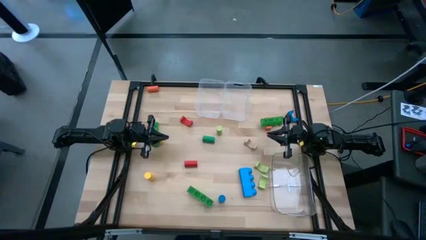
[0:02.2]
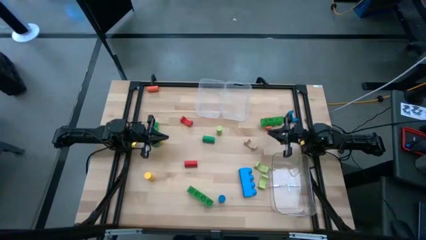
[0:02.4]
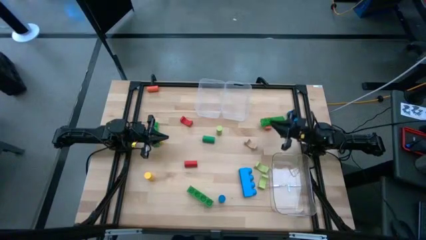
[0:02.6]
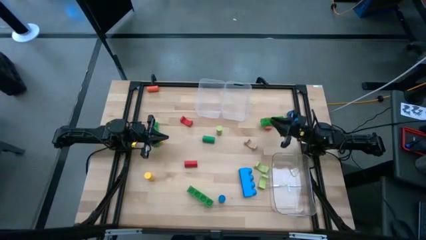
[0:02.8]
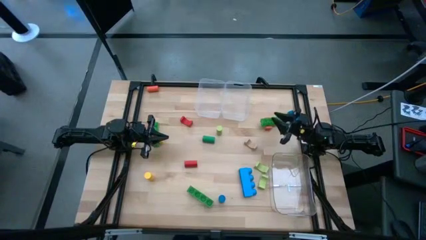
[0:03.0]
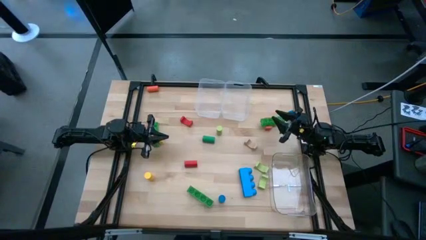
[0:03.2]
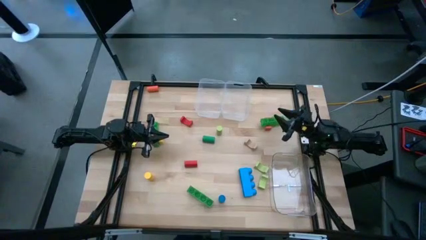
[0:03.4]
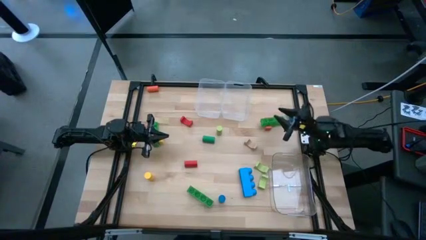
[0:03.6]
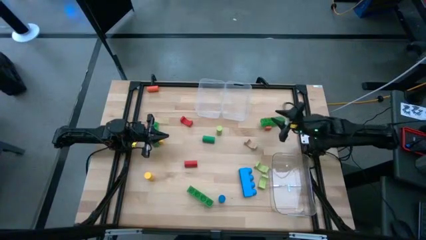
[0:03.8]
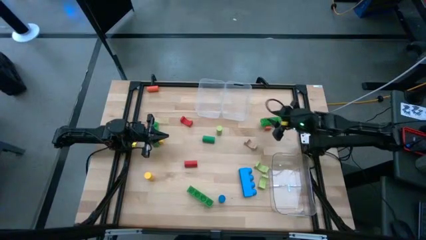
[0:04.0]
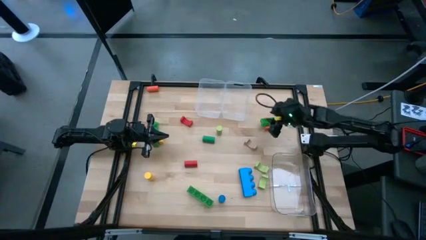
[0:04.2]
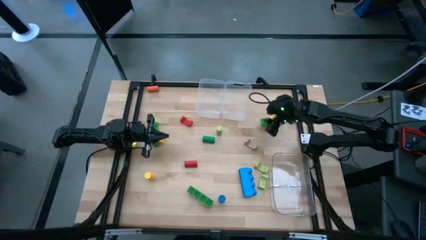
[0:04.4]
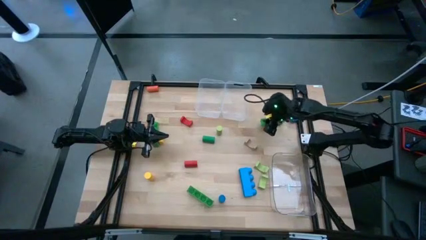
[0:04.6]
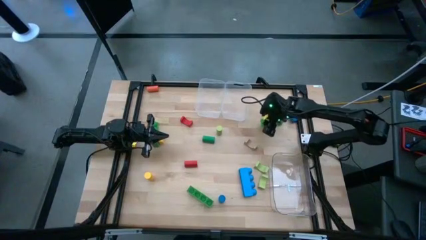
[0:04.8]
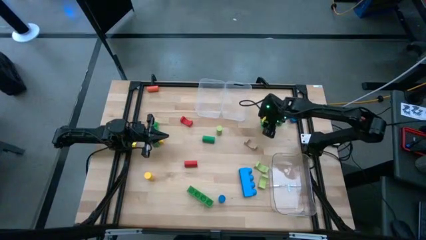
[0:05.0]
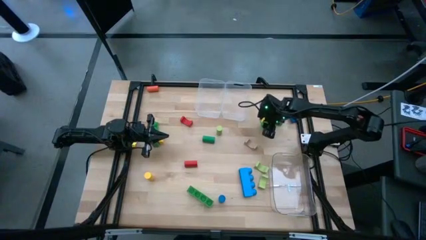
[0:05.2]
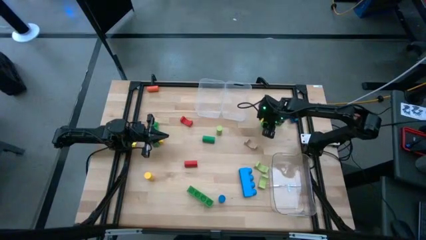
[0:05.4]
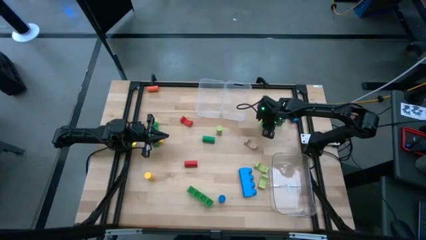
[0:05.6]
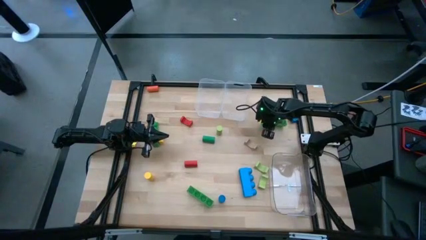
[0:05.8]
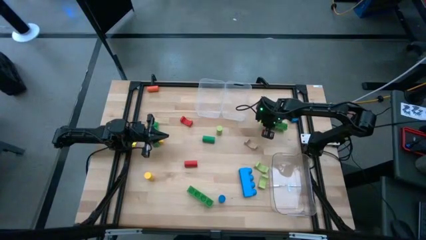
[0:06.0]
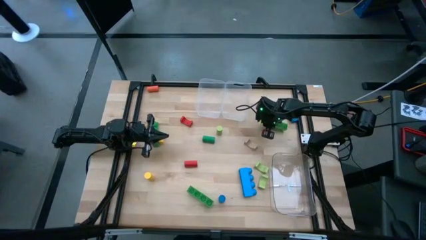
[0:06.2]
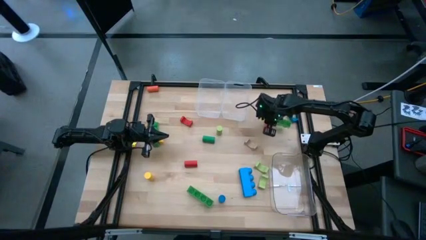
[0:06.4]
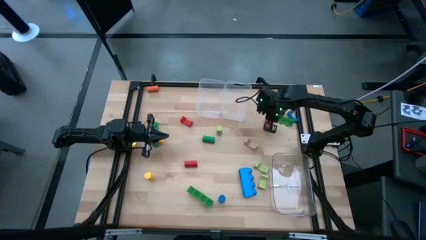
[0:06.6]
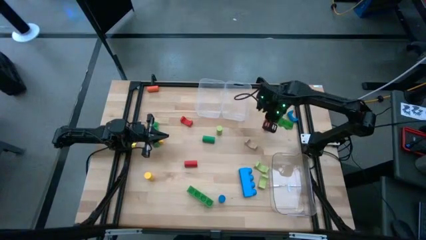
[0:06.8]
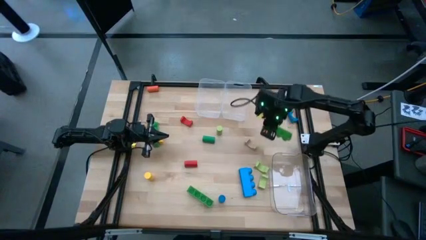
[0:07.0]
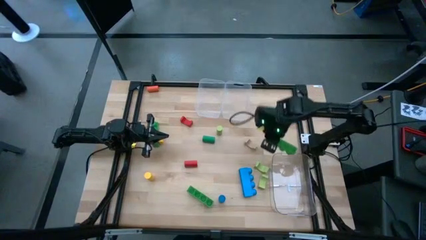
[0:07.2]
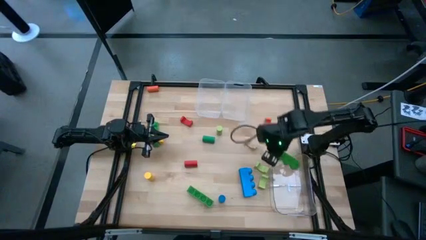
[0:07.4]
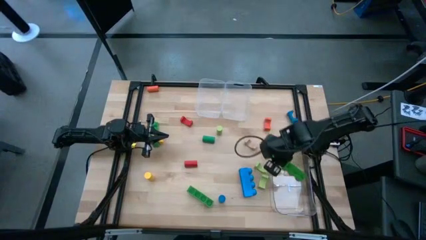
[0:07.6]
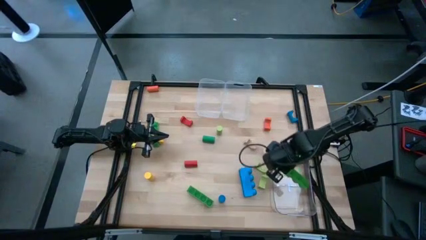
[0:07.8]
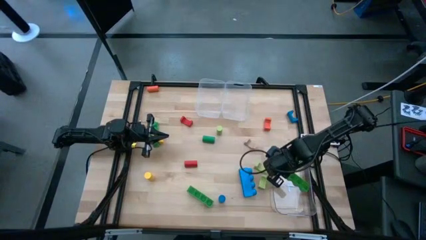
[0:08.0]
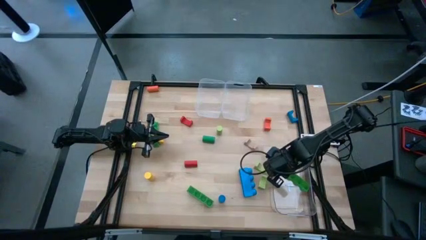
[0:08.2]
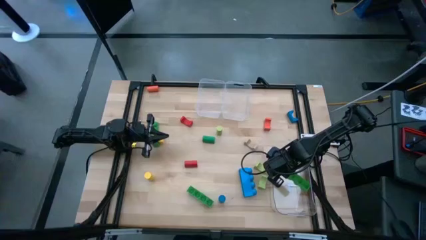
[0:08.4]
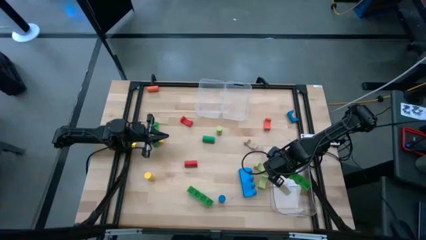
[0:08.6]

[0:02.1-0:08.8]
Task: Sort blocks by size
Put the green 4 stud game piece into the bottom transparent bin

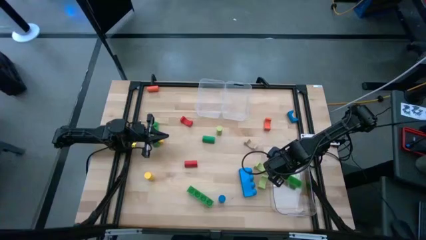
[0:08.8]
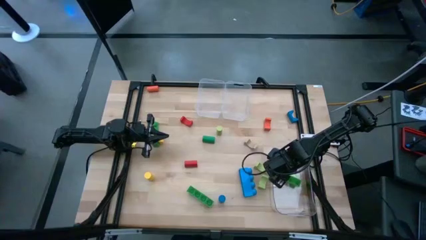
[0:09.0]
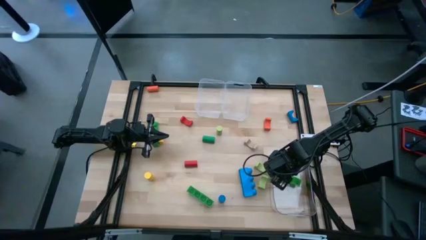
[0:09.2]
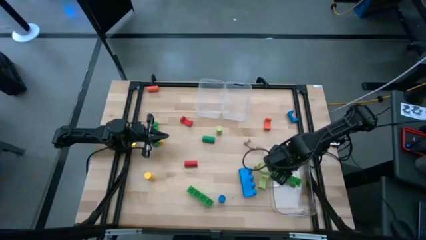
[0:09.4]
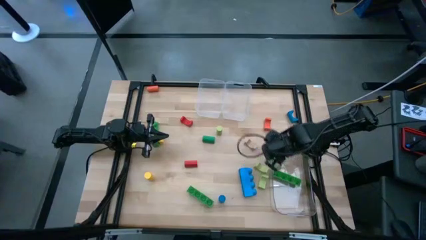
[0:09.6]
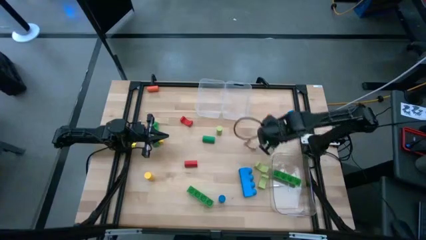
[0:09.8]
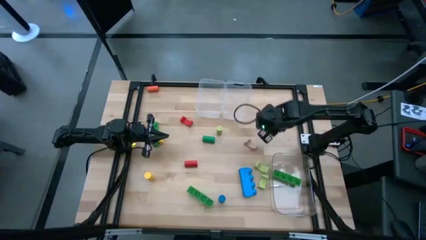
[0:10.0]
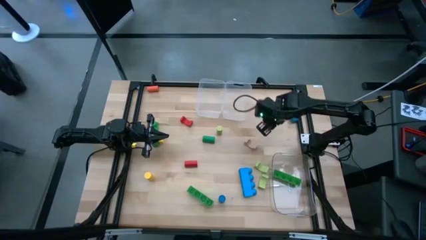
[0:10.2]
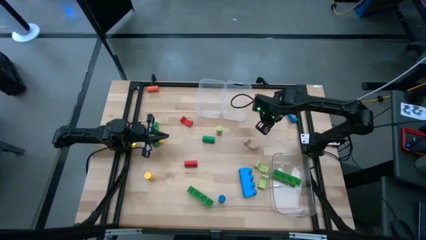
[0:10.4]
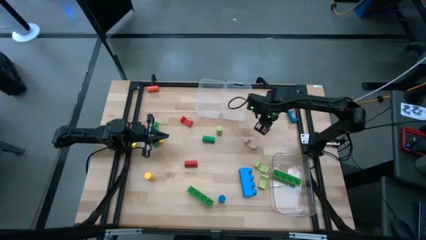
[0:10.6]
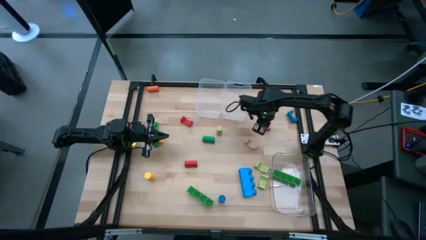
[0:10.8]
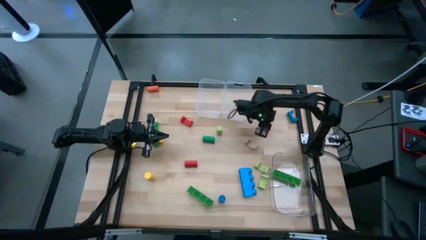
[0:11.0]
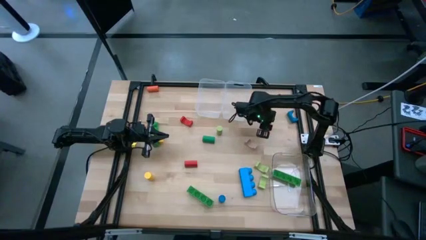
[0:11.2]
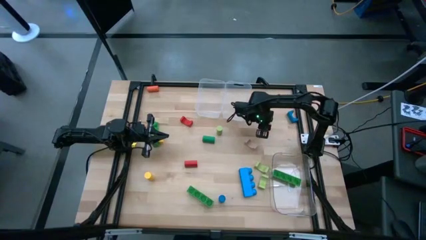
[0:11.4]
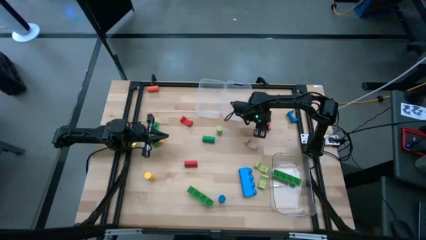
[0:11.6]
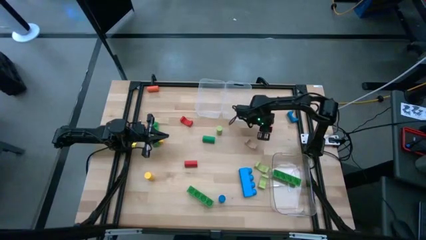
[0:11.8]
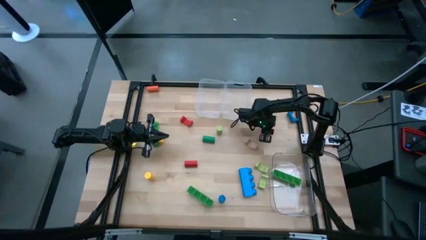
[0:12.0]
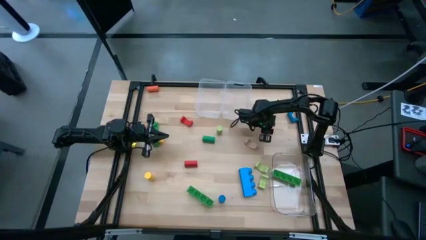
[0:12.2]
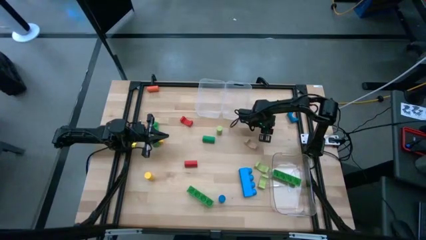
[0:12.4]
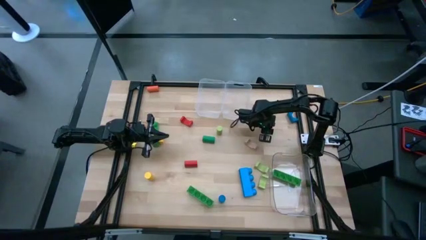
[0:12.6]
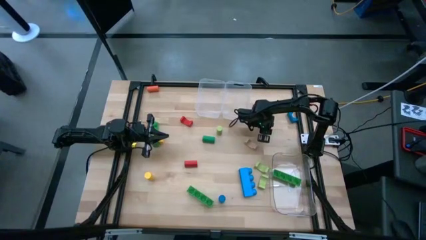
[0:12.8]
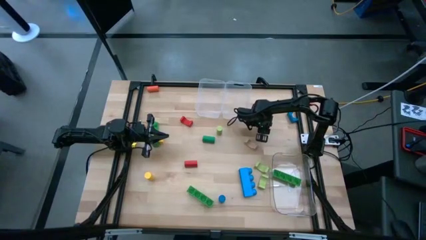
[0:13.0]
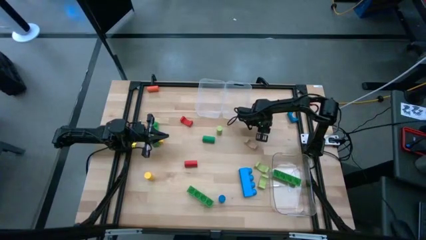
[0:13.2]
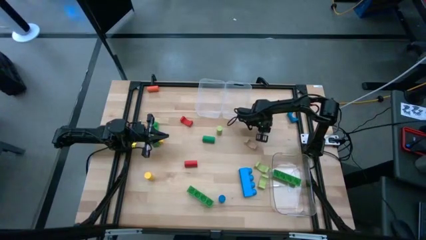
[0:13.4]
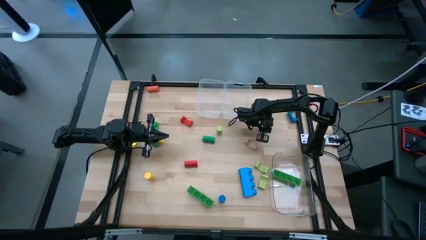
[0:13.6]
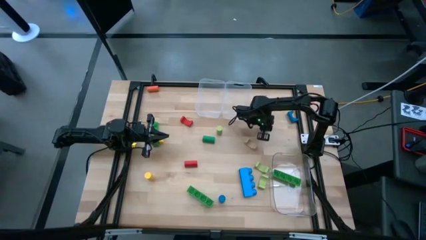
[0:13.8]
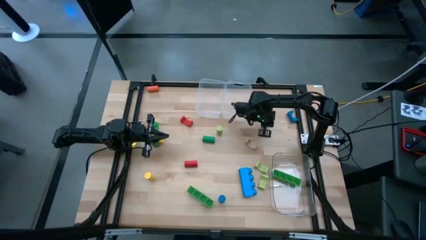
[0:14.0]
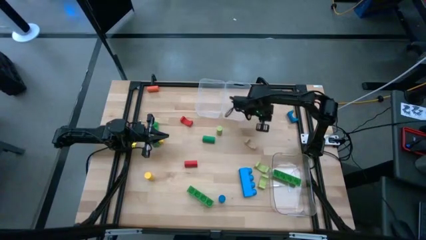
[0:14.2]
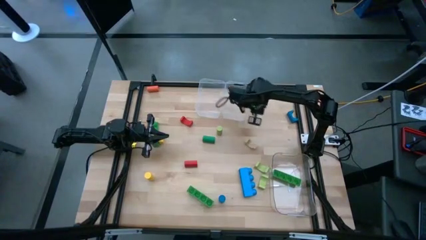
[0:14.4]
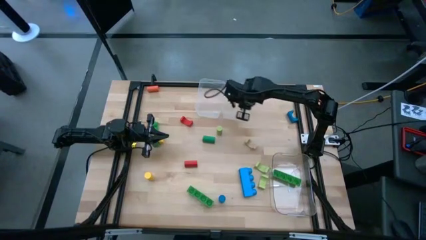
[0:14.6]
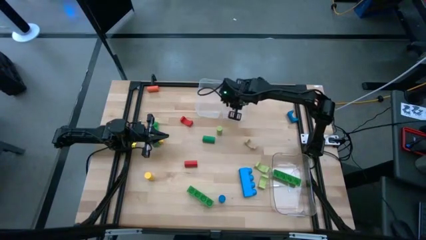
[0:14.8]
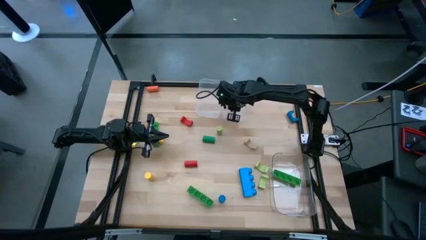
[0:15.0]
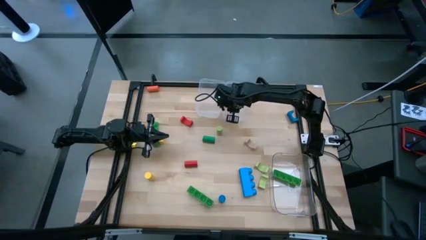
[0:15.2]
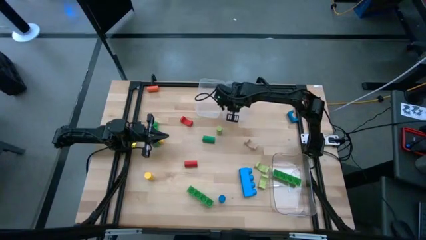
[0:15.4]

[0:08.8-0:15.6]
Put the orange arch block into the right transparent bin

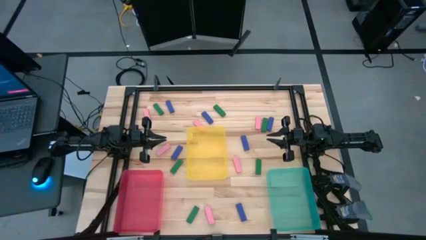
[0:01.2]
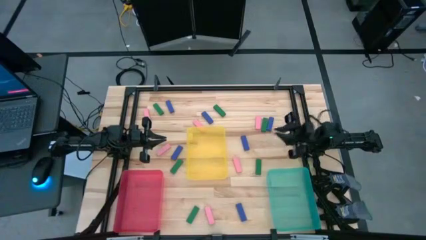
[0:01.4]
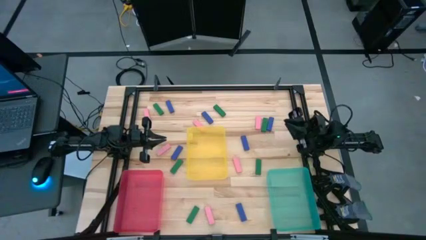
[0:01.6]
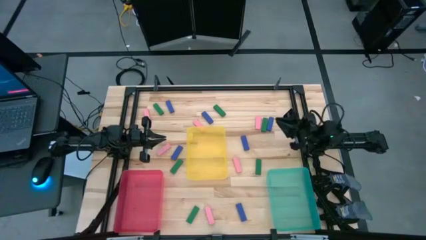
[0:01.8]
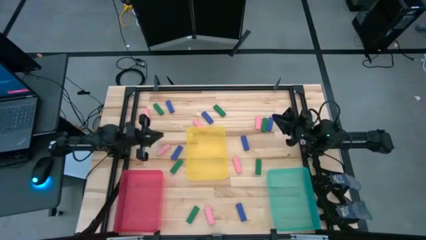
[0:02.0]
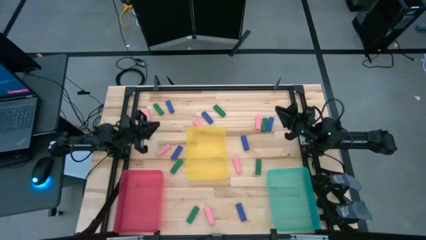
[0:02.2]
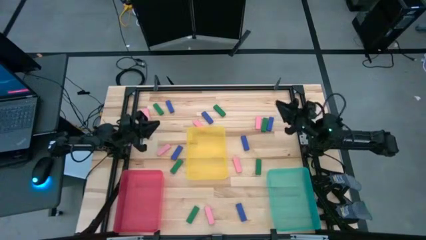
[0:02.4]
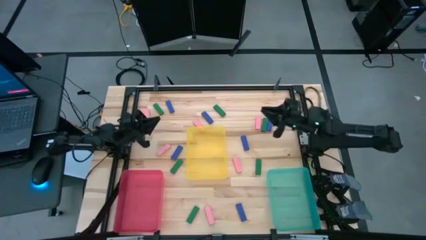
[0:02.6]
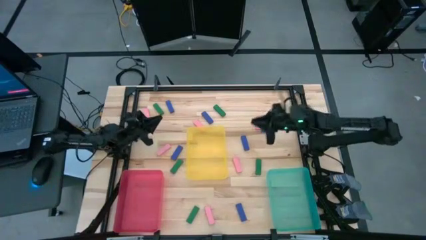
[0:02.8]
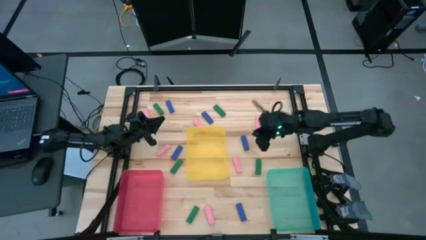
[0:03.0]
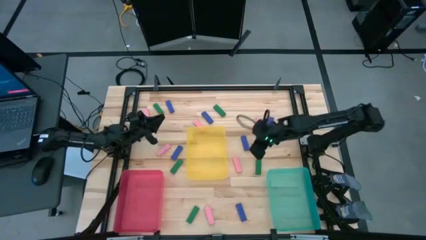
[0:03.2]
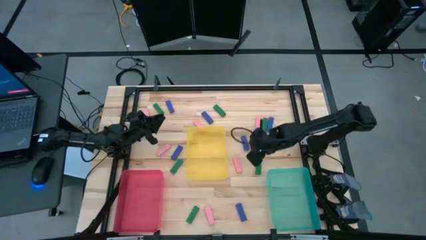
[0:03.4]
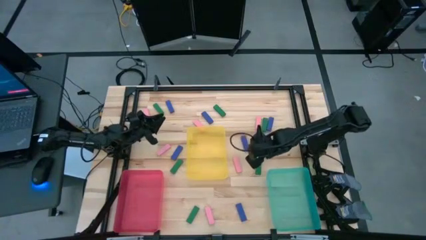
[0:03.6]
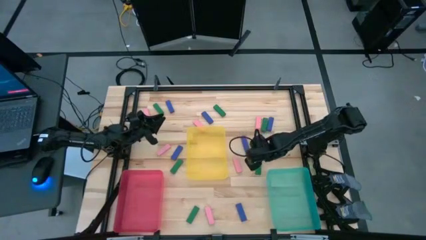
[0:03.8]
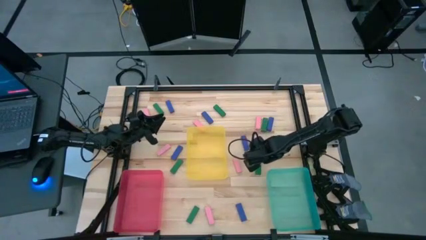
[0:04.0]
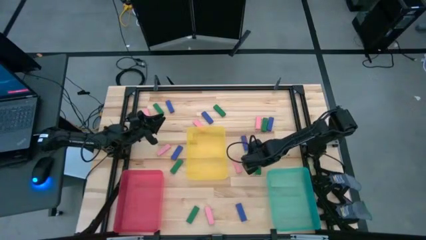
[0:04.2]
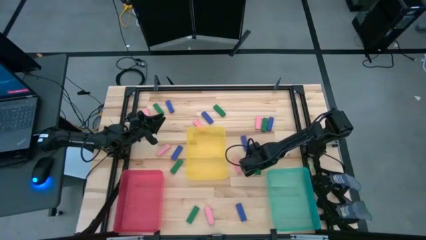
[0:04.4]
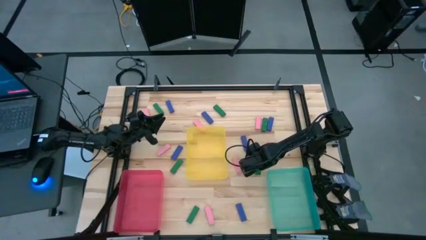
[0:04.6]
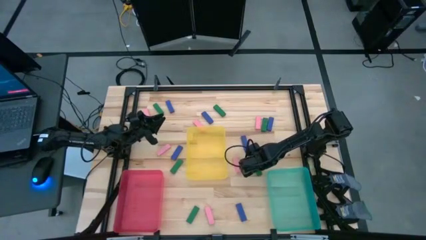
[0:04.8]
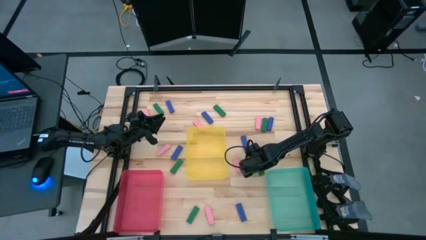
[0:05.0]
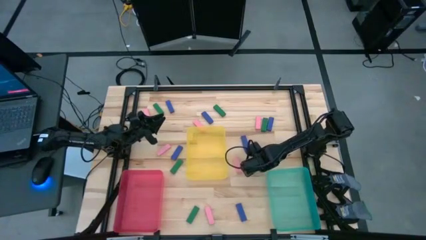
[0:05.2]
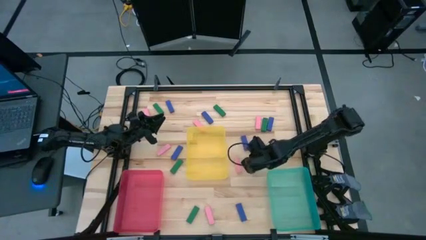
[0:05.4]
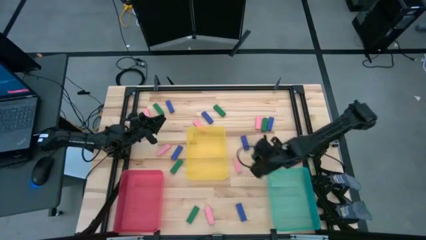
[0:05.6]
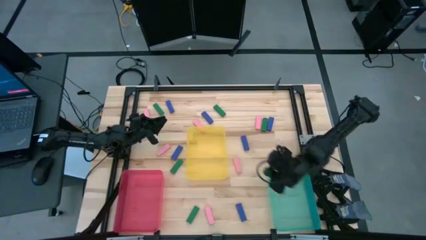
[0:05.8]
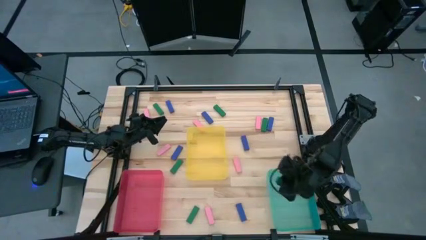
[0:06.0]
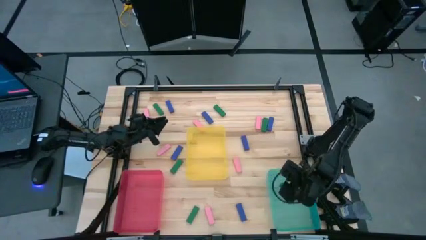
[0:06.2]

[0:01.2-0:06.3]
Task: Sort blocks
Put the green block into the blue bin
